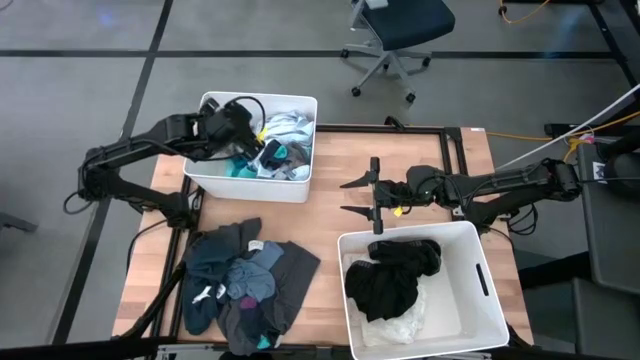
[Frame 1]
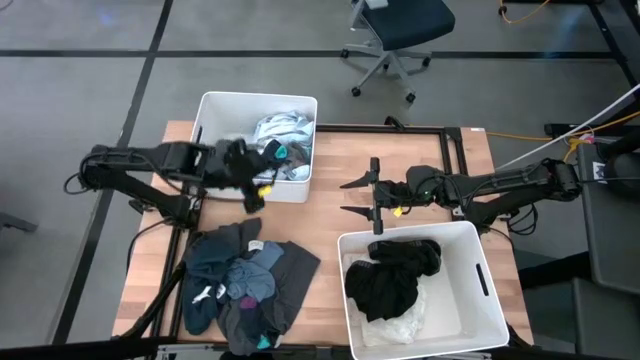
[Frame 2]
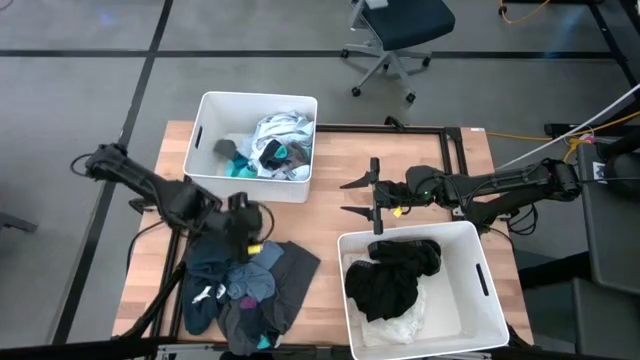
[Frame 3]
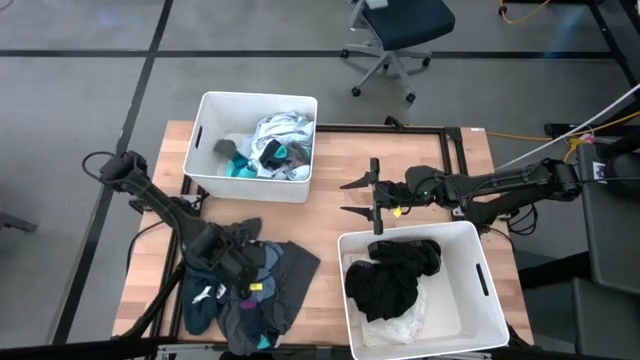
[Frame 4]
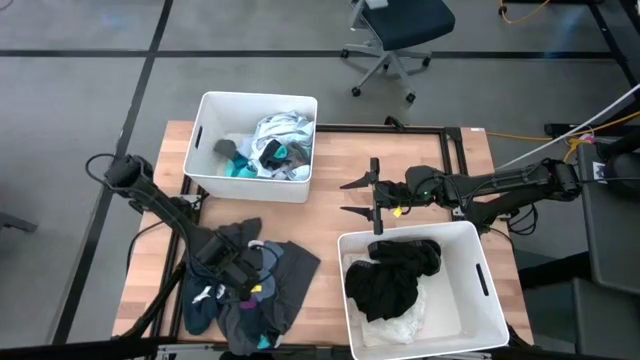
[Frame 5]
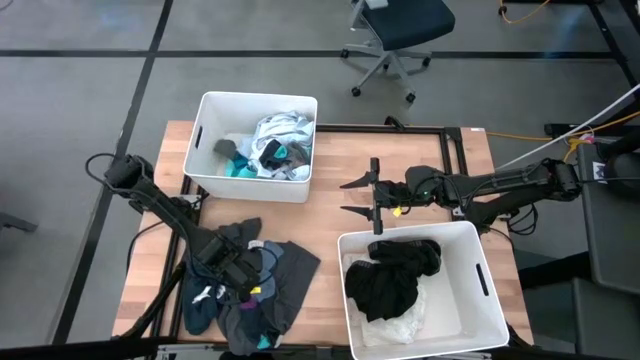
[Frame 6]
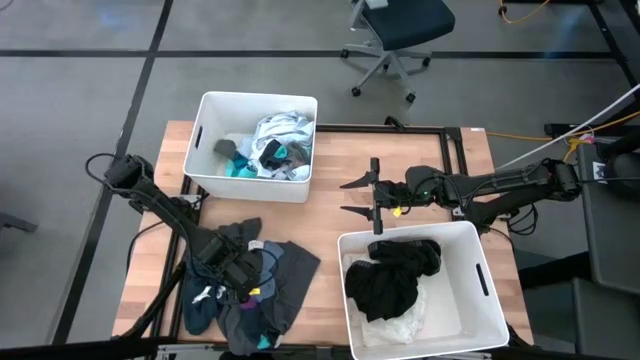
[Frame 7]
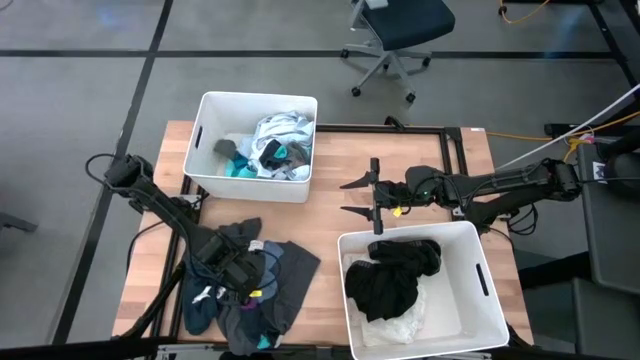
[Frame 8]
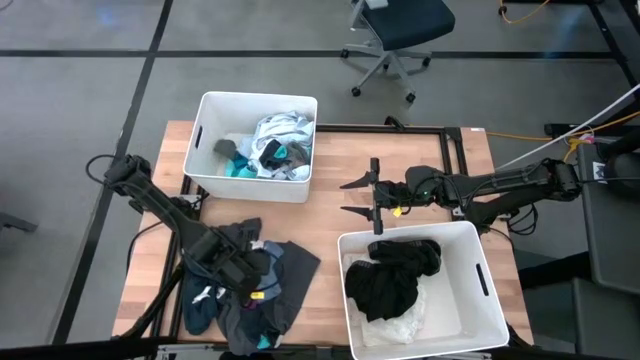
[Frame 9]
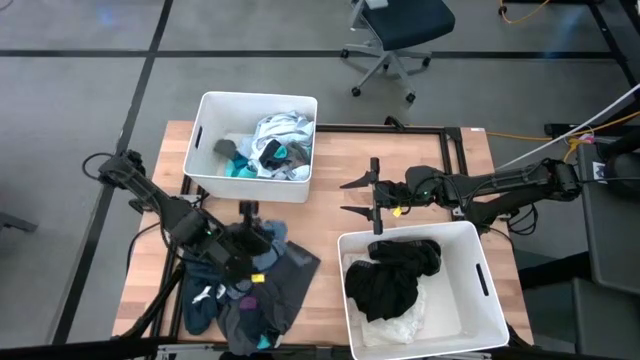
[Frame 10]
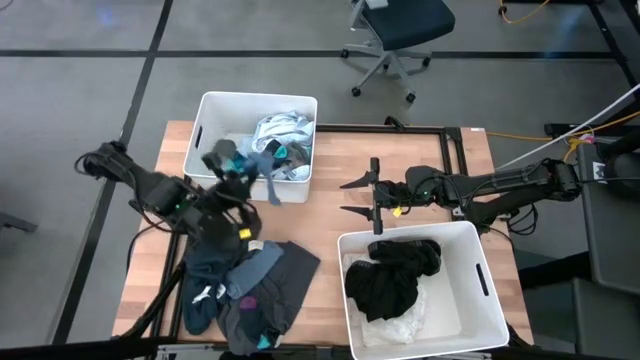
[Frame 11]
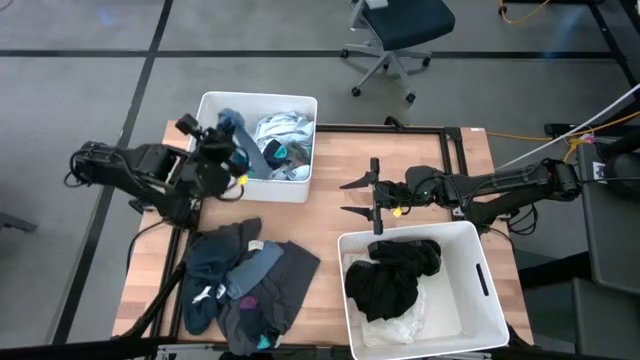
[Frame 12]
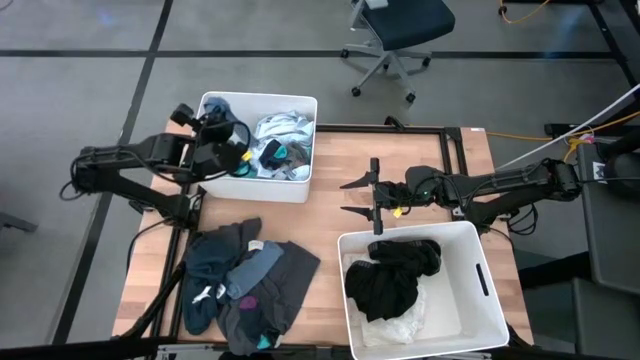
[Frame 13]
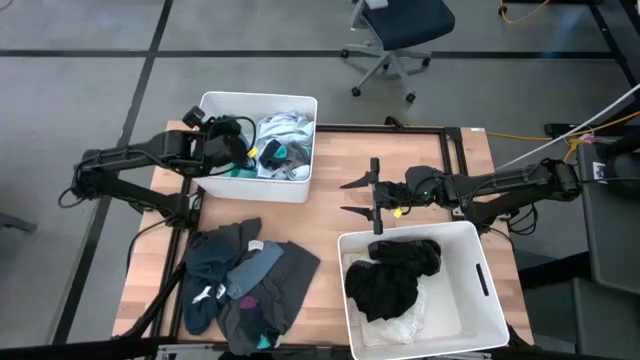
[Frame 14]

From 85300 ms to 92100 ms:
Task: Sort clothes
Put the blue socks into the top white laundry bin

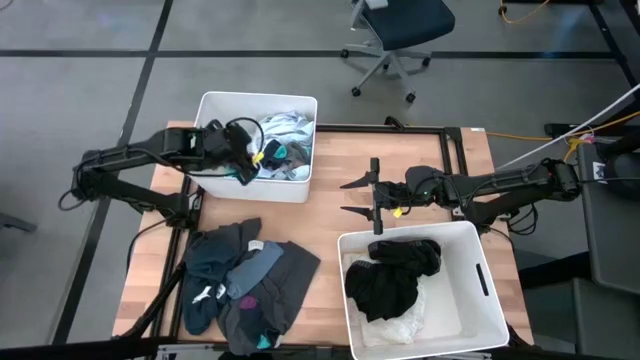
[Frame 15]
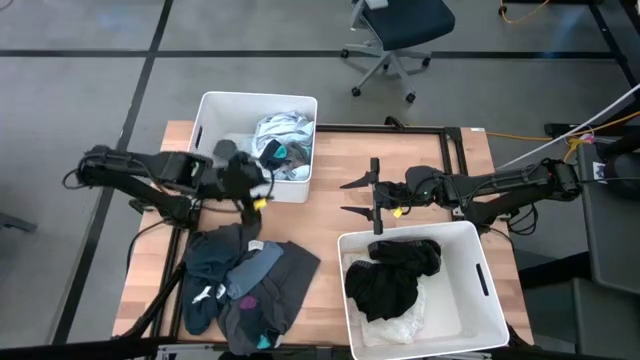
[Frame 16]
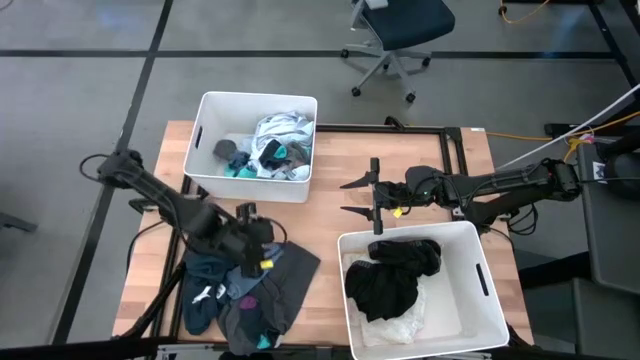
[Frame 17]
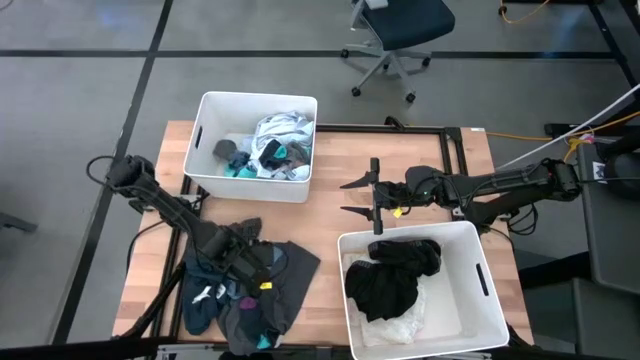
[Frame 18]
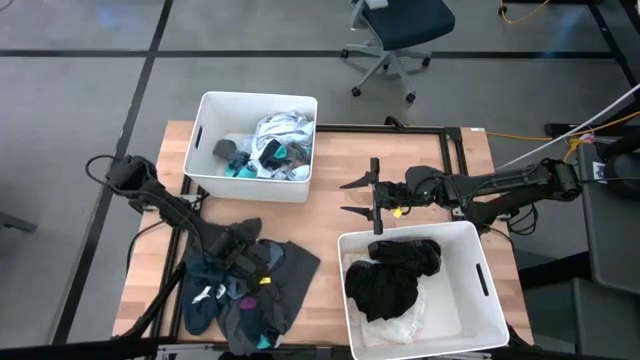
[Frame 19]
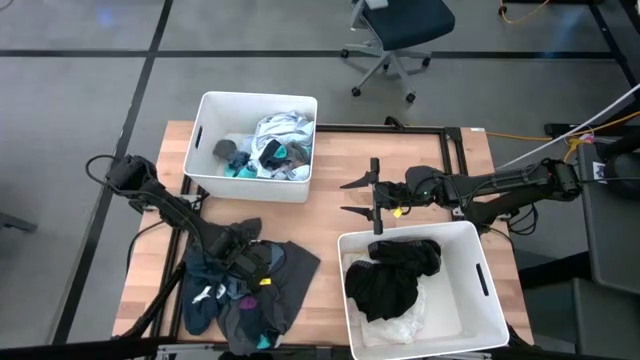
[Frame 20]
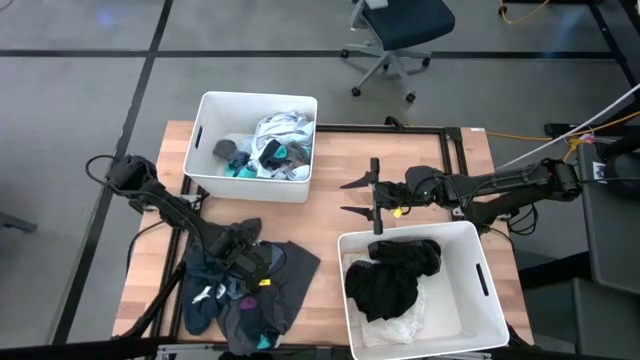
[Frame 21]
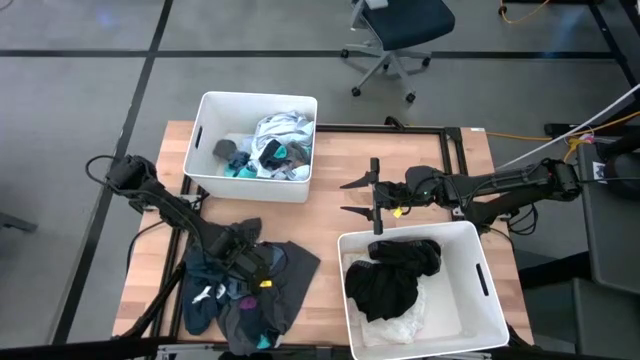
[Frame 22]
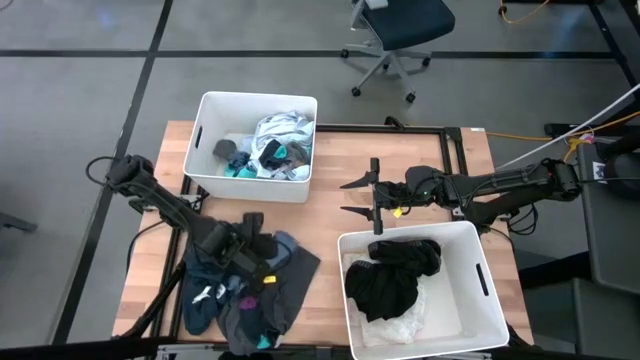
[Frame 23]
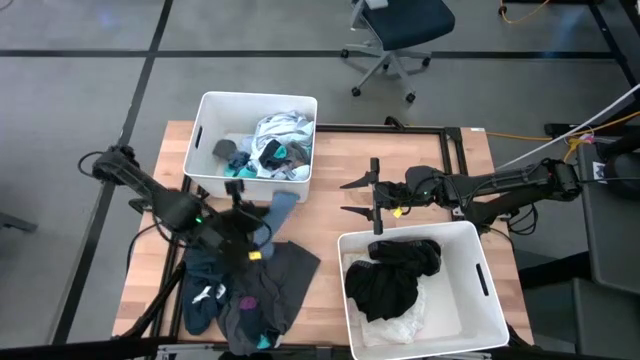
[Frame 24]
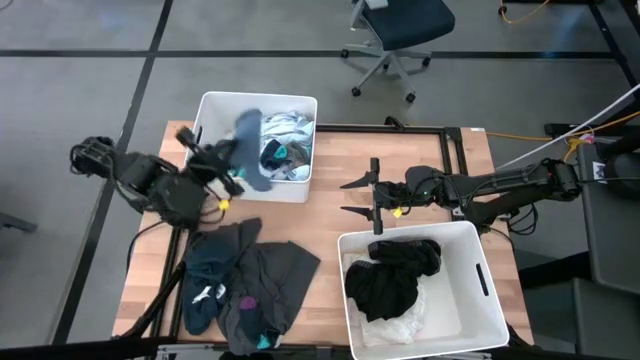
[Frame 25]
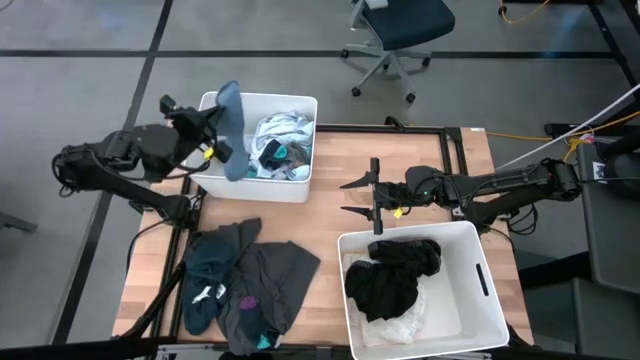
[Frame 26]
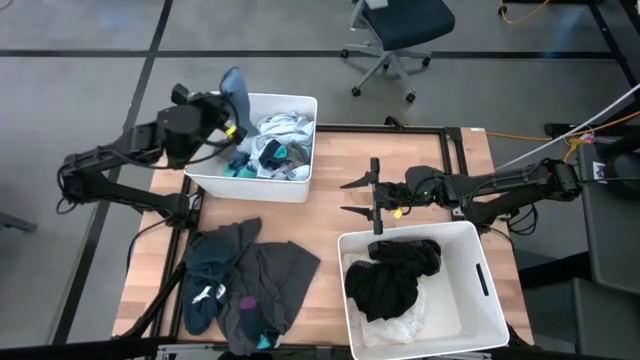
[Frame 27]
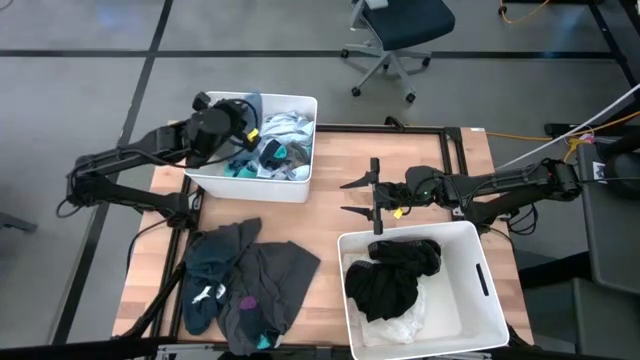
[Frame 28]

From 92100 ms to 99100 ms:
Put the blue sock into the top white laundry bin

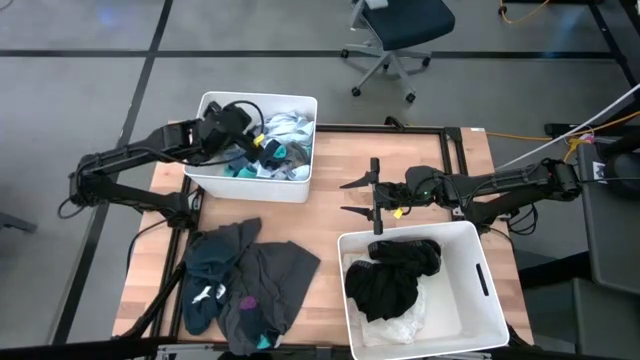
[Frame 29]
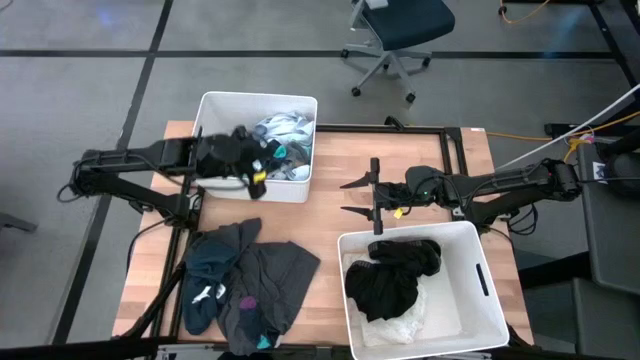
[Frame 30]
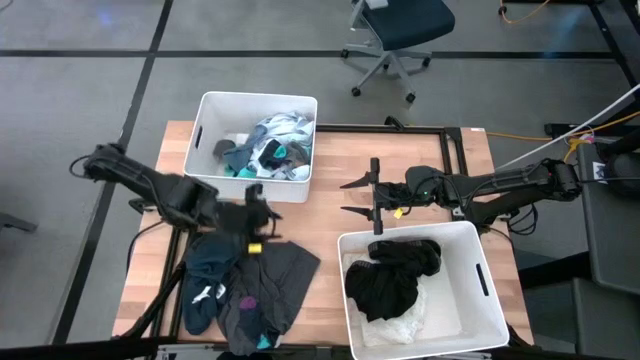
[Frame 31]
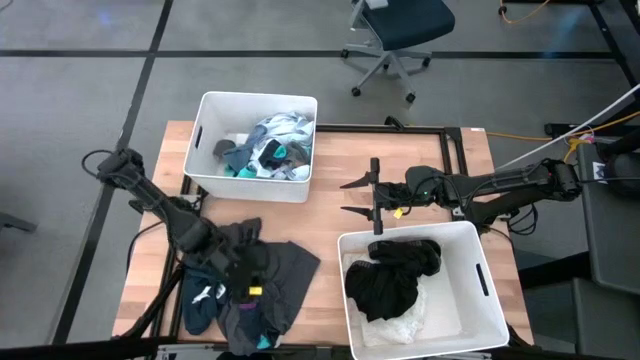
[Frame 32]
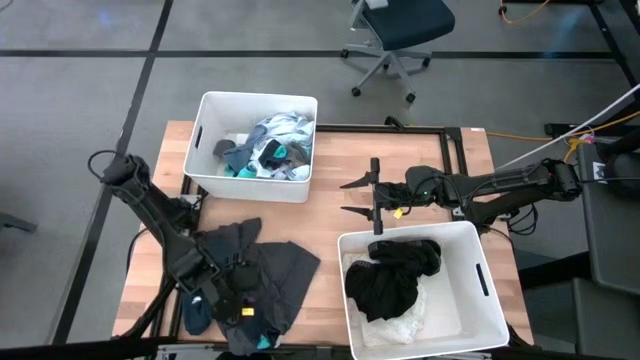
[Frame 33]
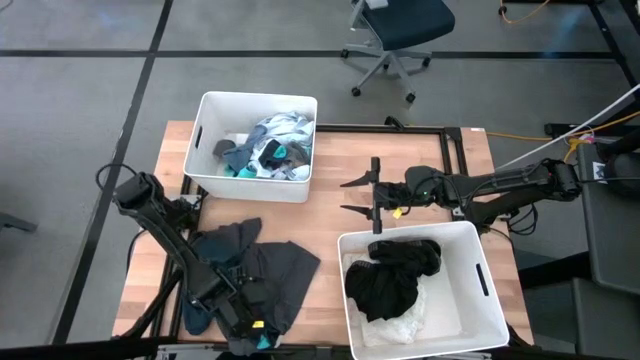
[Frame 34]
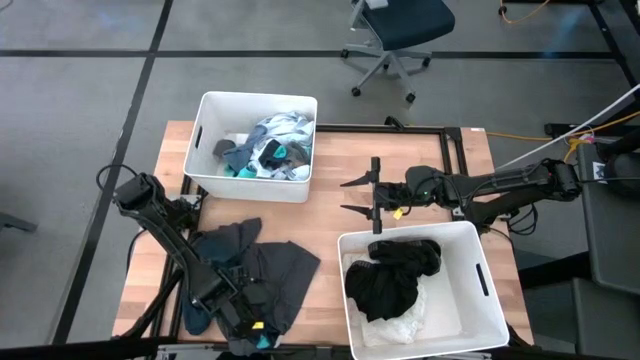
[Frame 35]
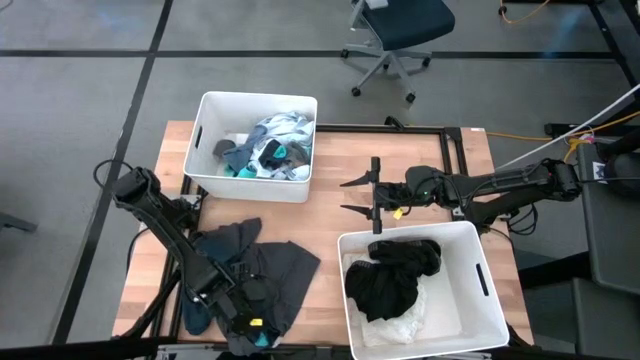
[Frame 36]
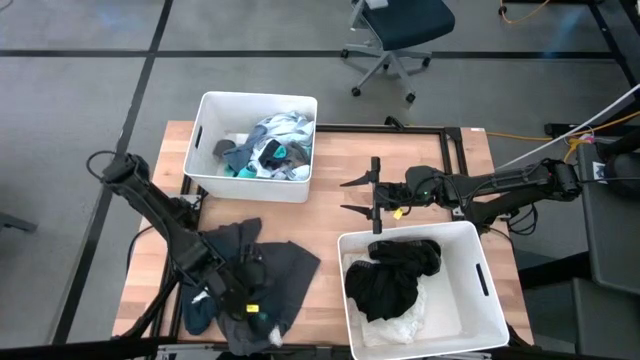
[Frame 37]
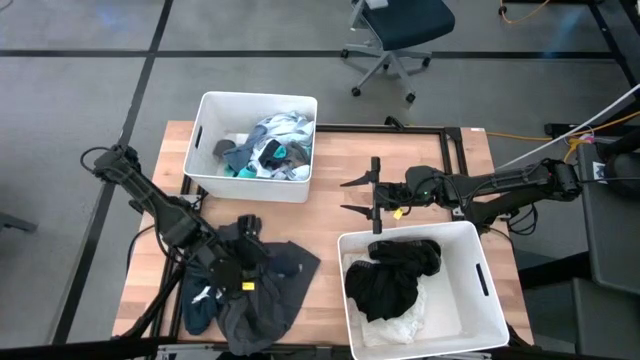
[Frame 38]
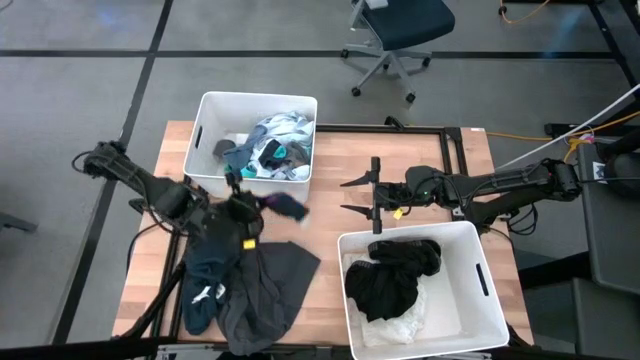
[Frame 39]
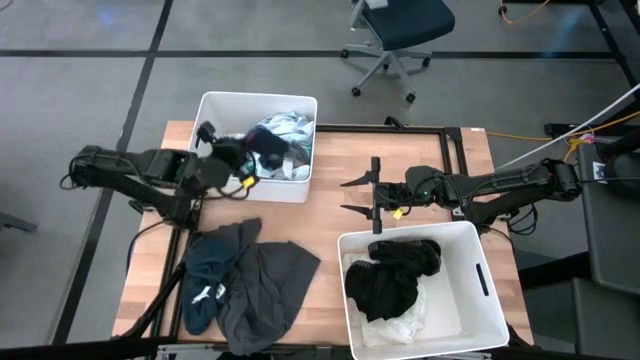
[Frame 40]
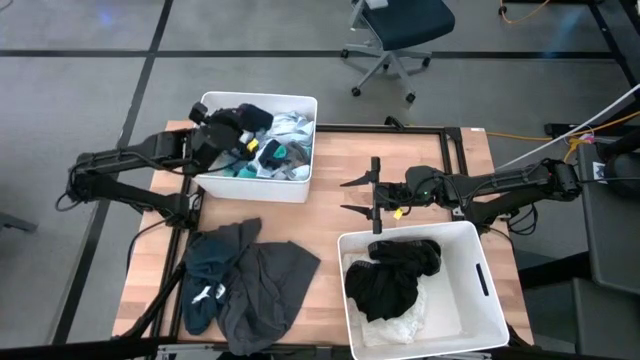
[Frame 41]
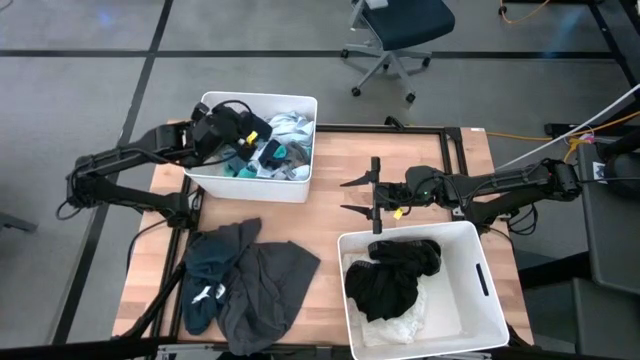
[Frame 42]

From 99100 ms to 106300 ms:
Put the black sock into the top white laundry bin
